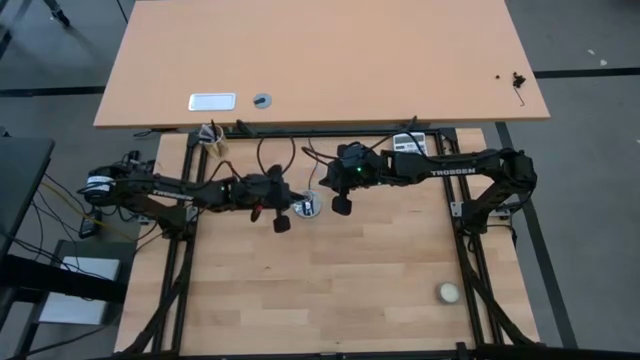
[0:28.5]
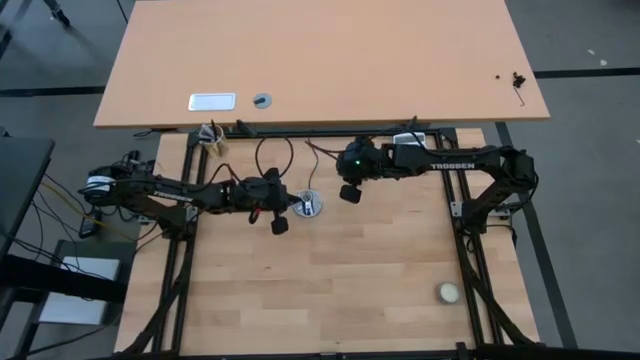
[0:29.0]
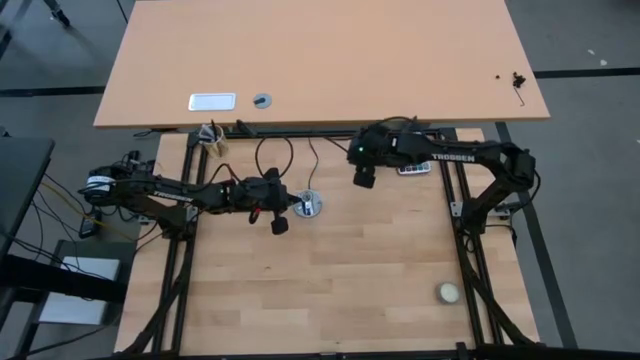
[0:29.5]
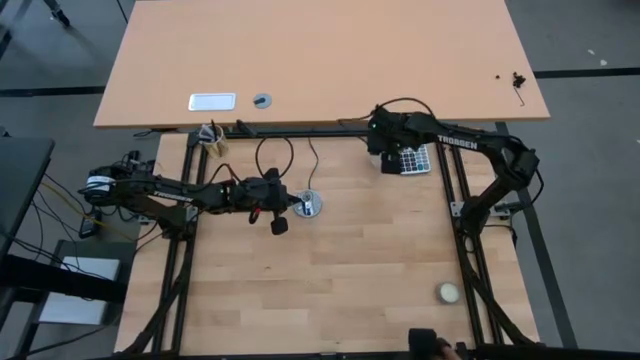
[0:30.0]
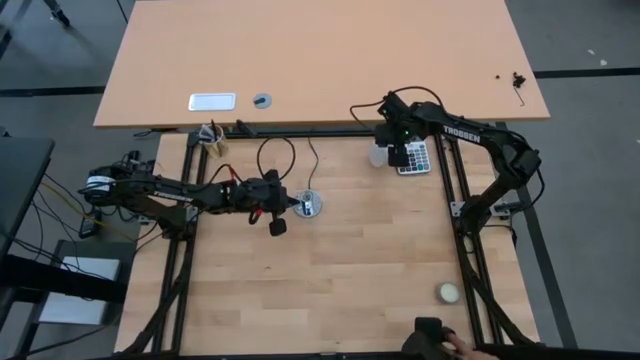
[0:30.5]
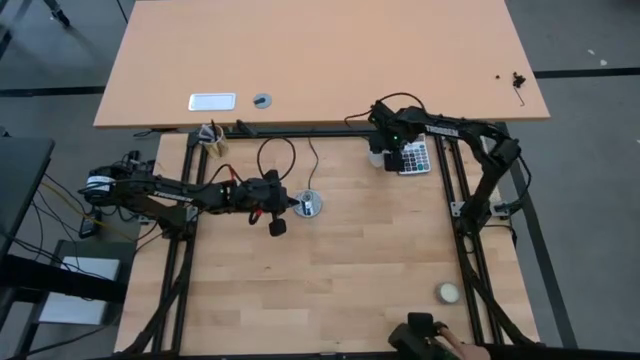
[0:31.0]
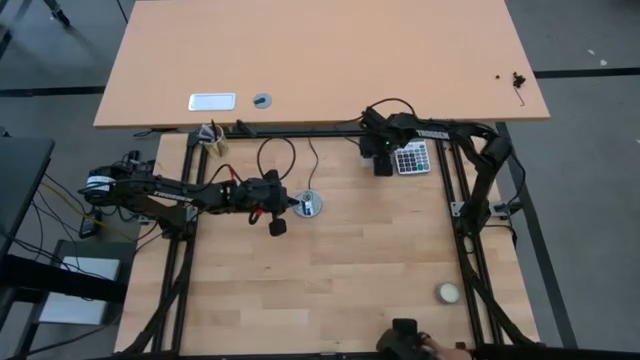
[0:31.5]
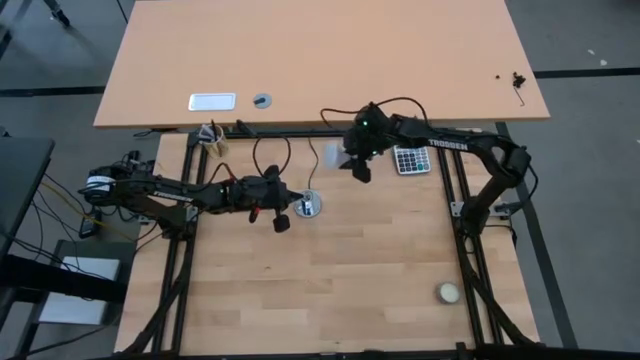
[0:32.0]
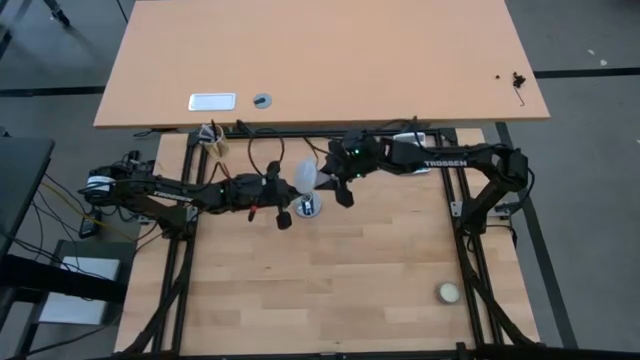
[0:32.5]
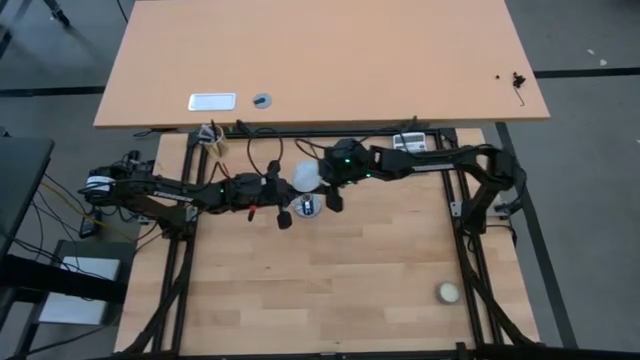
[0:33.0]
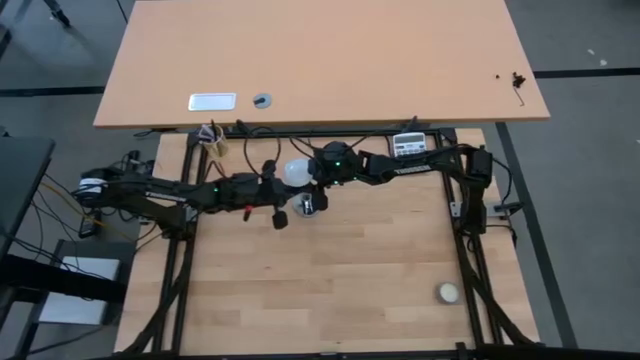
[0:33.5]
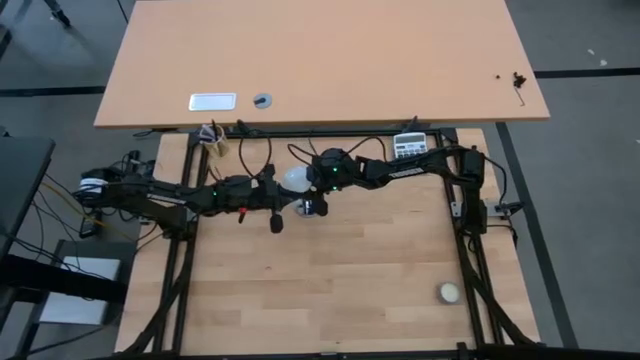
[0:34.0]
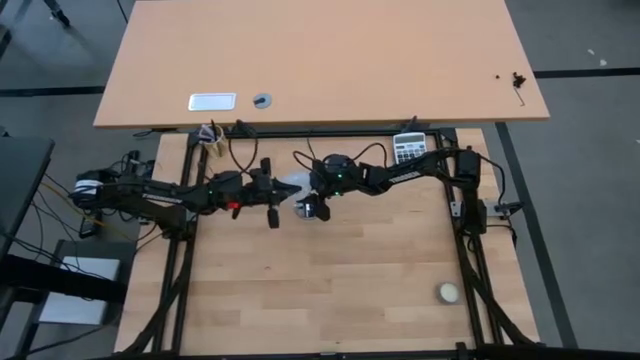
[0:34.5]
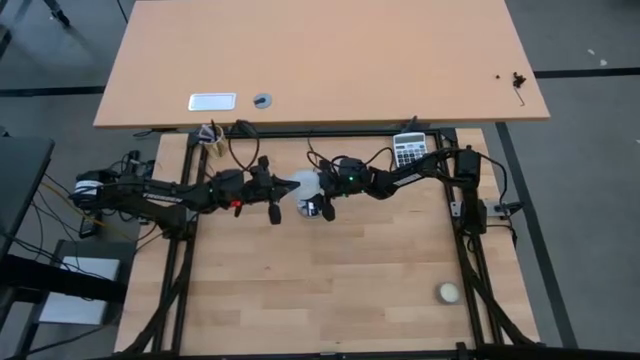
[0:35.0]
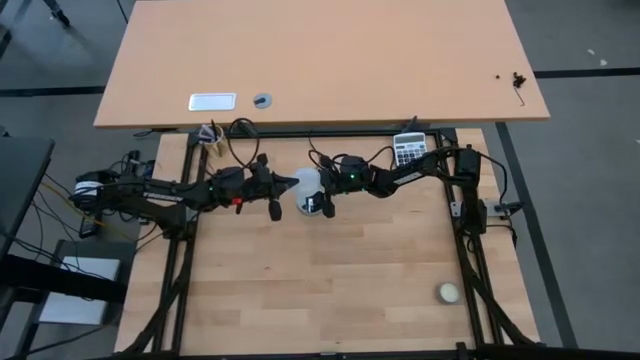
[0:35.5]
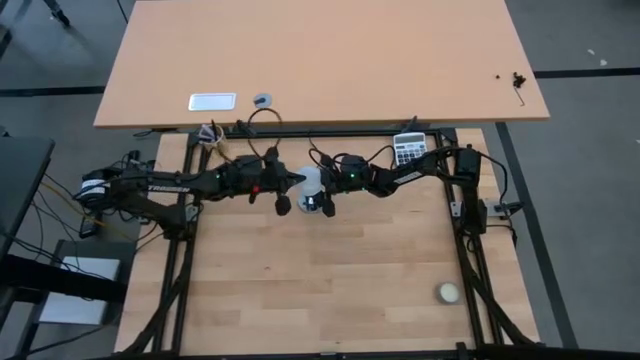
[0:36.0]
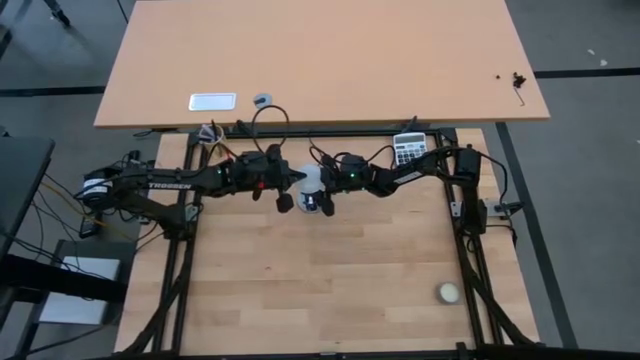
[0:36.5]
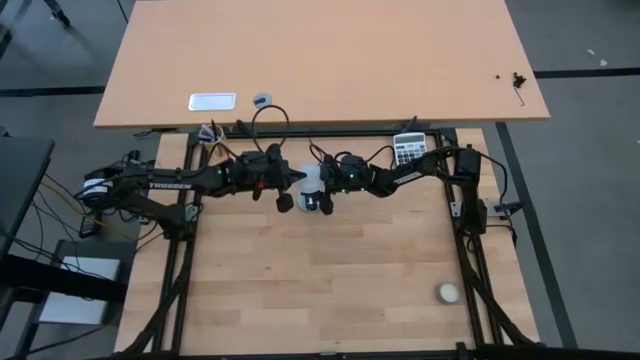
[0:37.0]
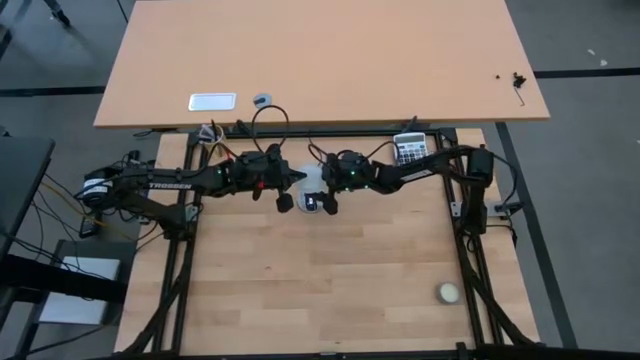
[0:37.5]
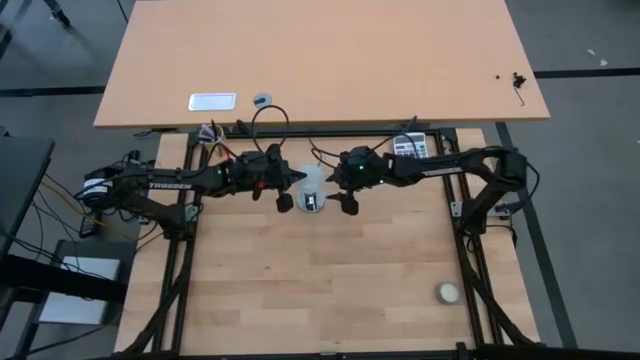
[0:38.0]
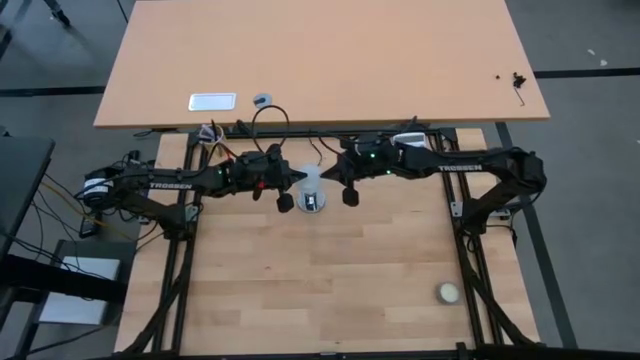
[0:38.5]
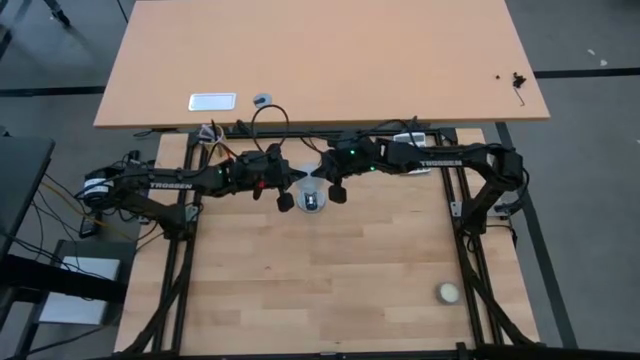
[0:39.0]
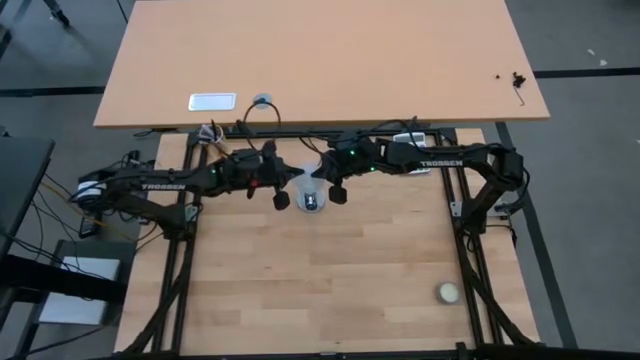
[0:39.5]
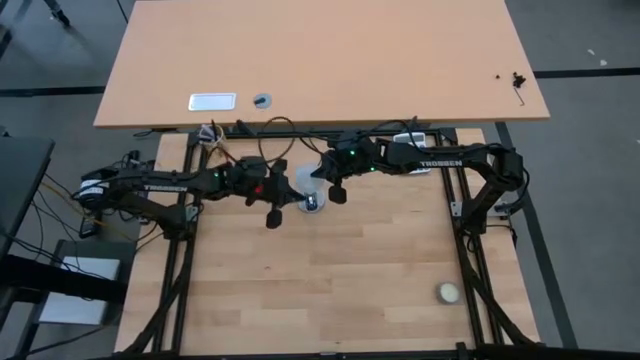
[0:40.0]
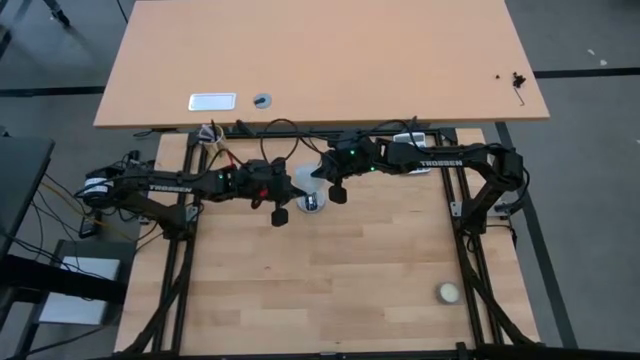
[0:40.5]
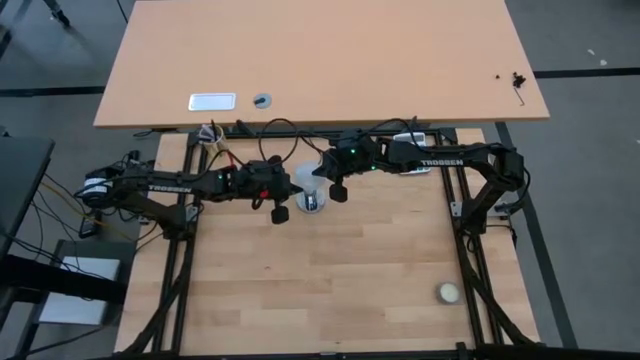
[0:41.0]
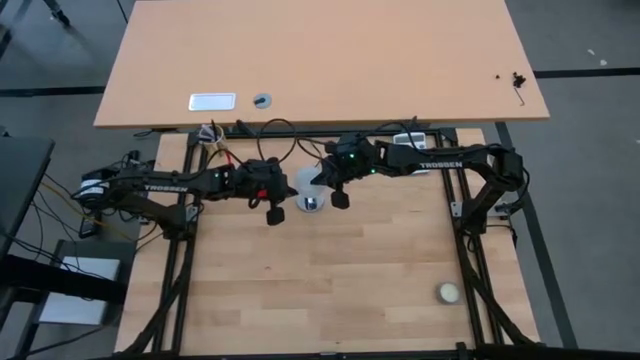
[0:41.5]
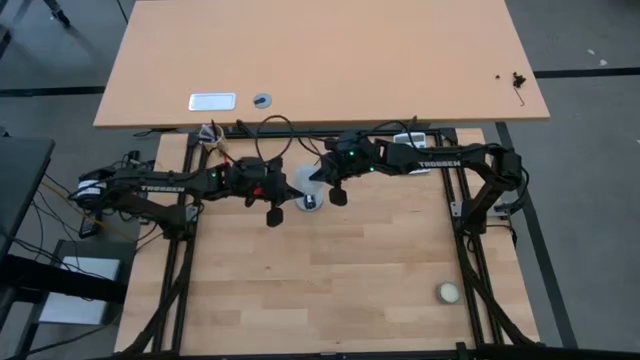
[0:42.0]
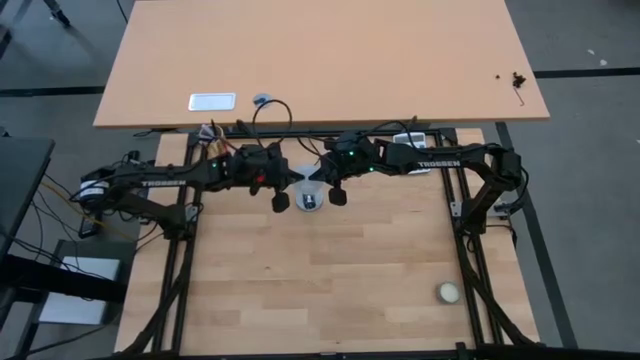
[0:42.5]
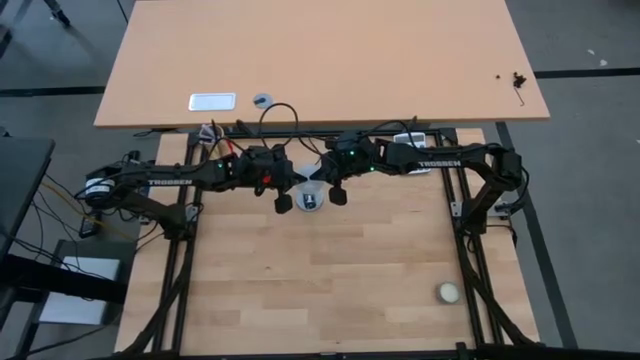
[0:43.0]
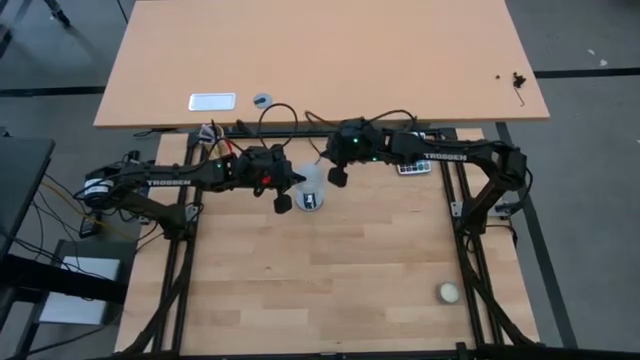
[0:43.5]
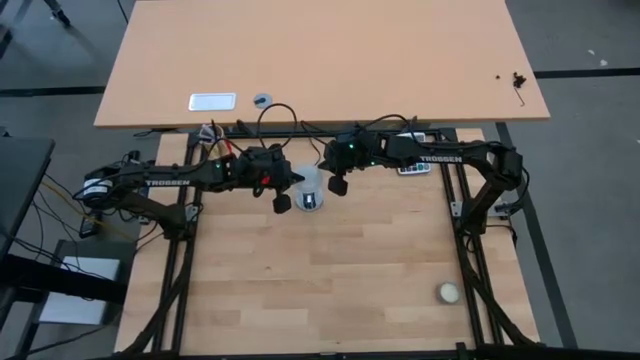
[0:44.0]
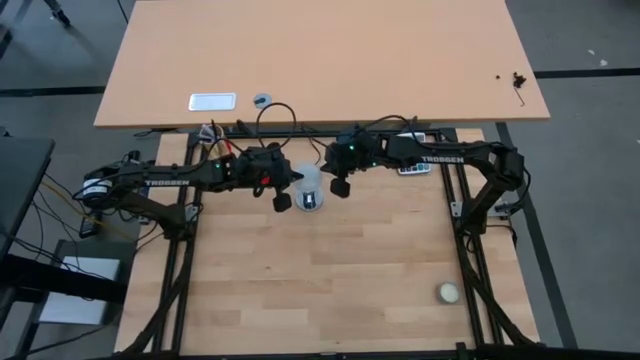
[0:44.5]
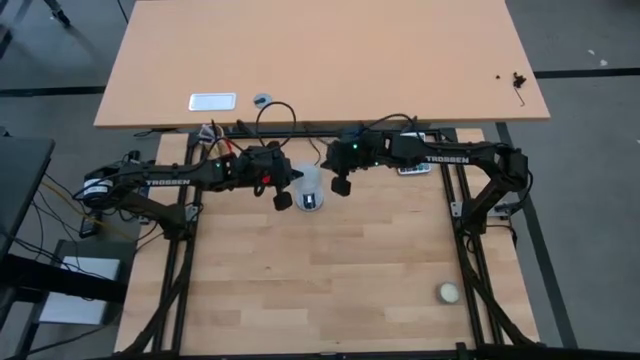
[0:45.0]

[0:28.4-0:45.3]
Task: Screw lightbulb
Insert the white lightbulb into the silver lamp

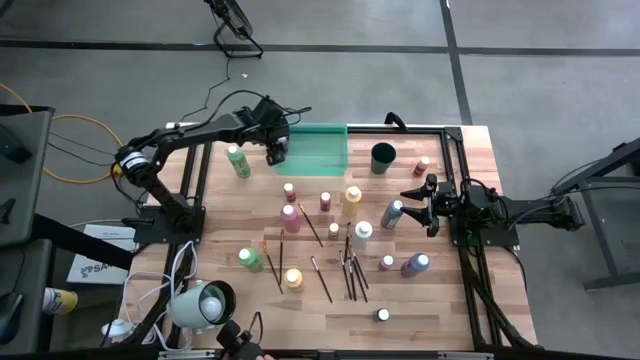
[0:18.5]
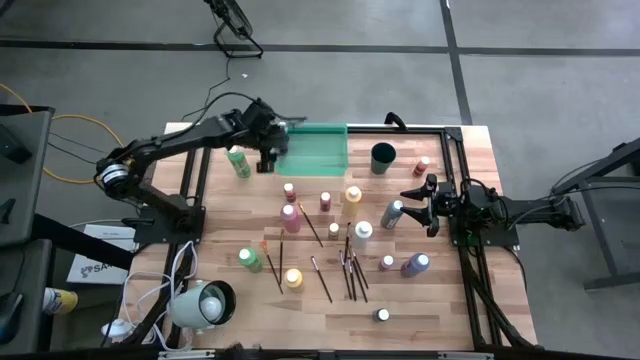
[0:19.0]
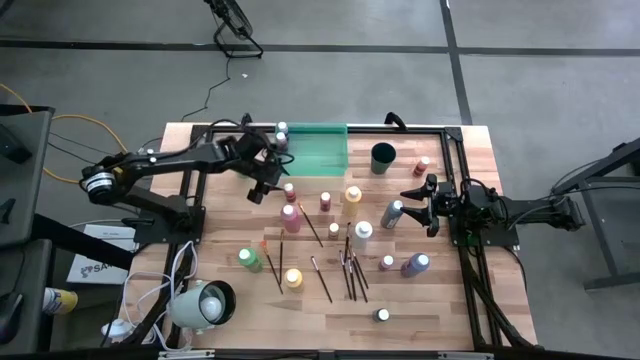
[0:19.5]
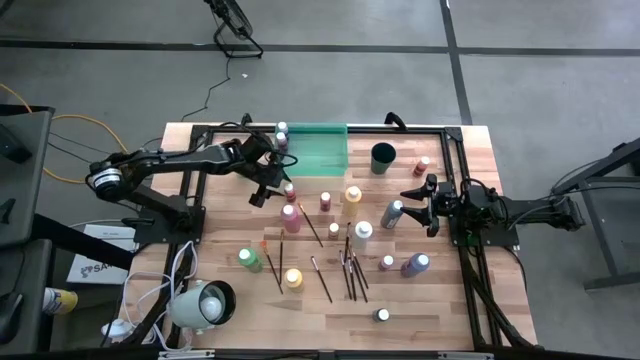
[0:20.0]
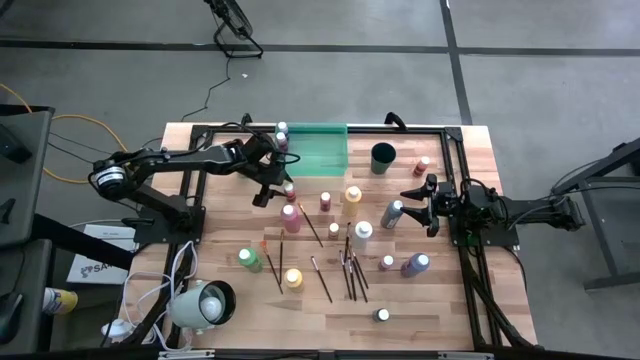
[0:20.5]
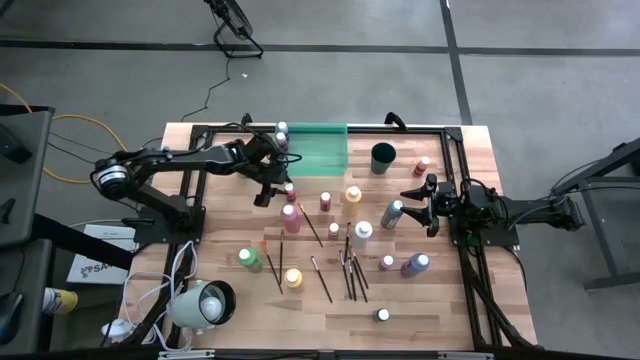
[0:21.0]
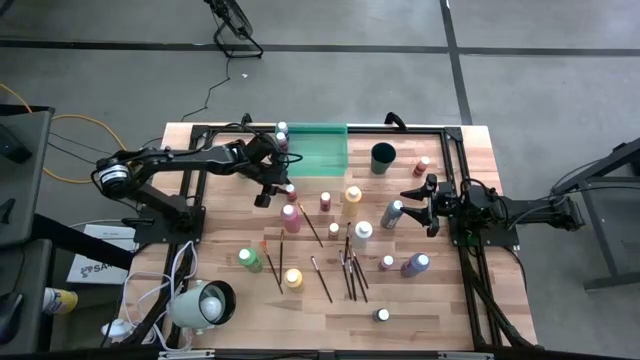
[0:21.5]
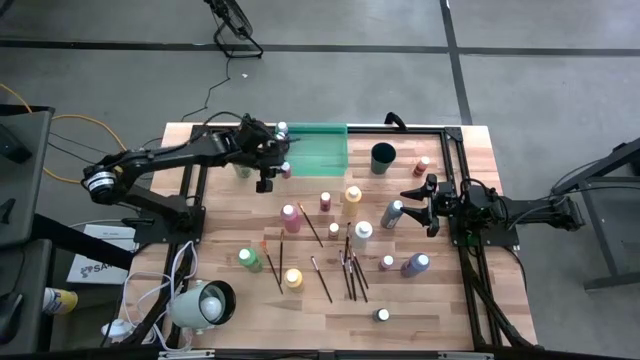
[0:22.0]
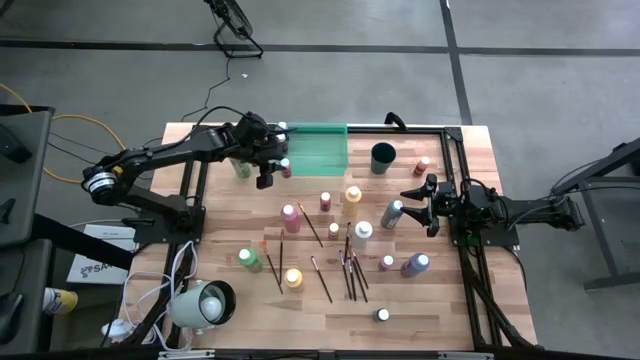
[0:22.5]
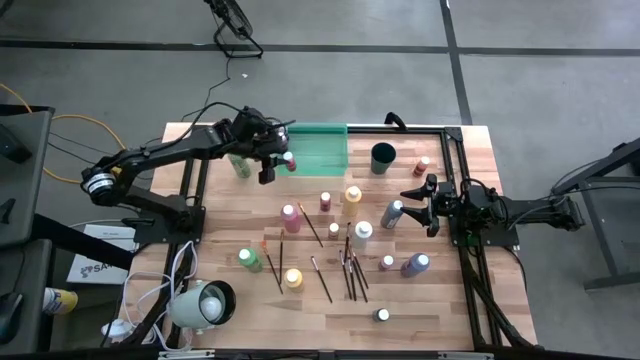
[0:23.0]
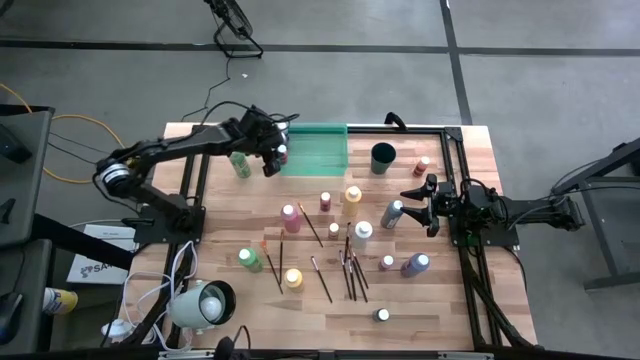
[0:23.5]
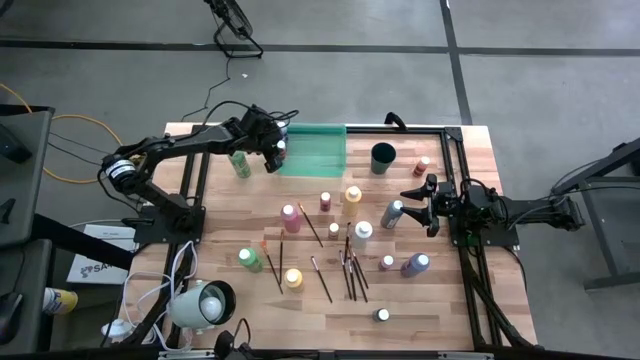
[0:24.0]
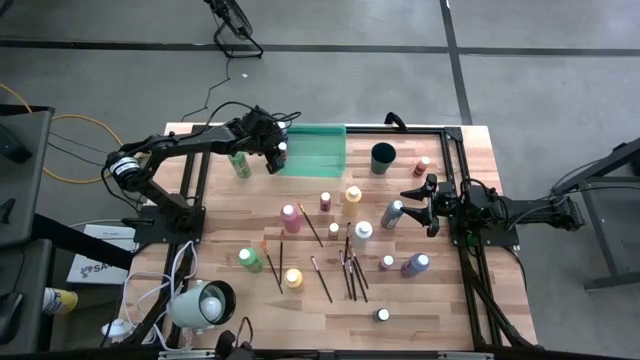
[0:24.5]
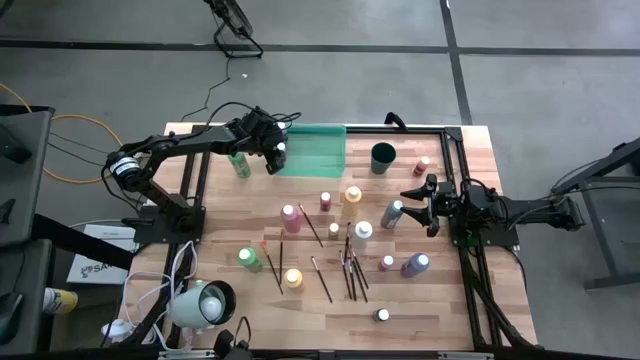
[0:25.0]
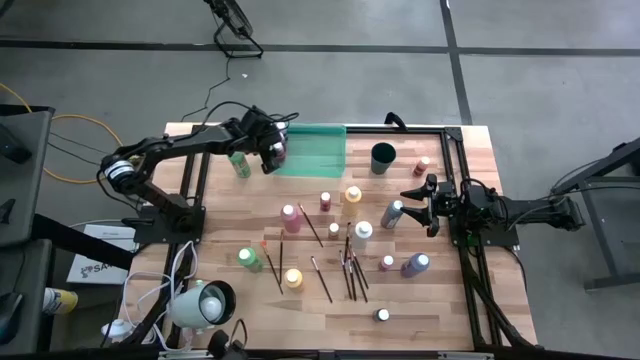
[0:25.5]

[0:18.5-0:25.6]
Task: Pick & Place Paint Supplies
Put the orange paint bottle into the green bin
